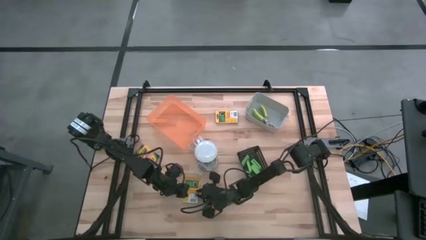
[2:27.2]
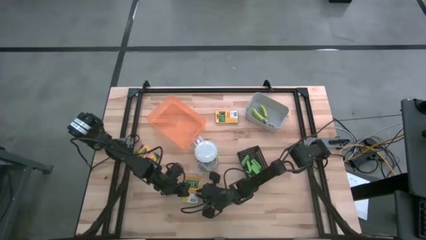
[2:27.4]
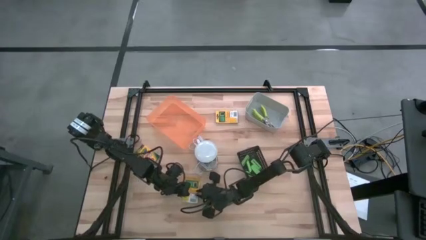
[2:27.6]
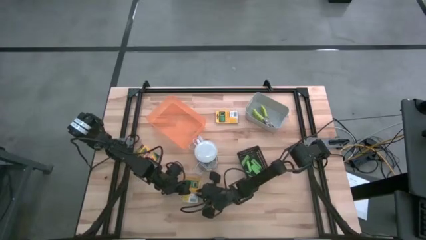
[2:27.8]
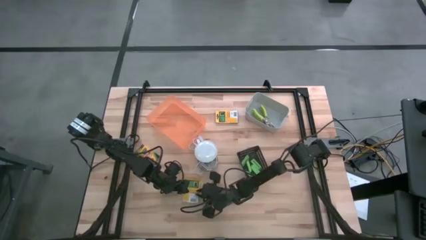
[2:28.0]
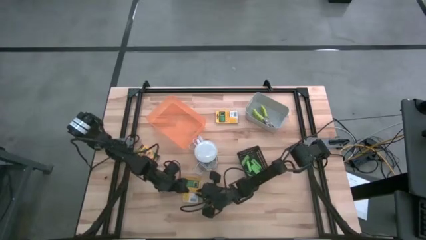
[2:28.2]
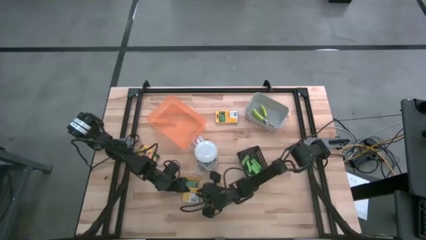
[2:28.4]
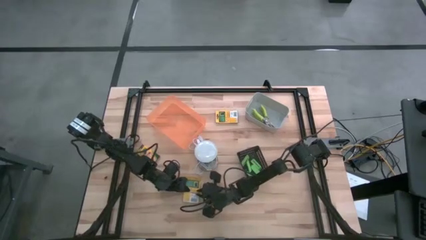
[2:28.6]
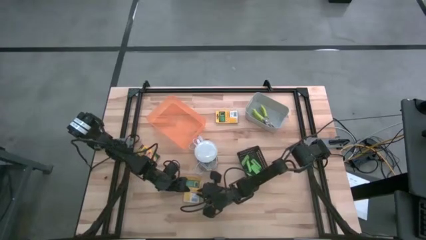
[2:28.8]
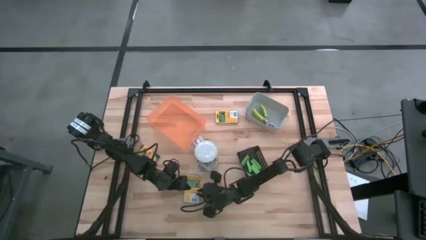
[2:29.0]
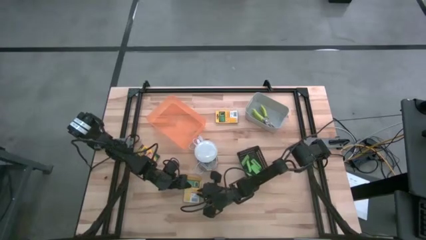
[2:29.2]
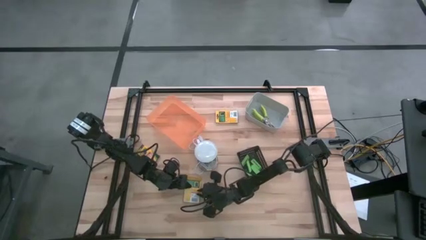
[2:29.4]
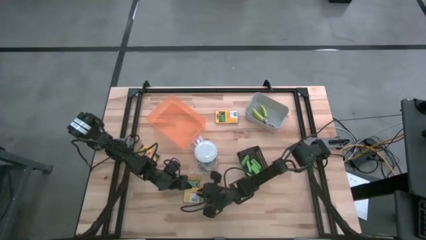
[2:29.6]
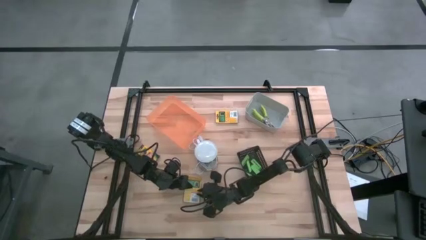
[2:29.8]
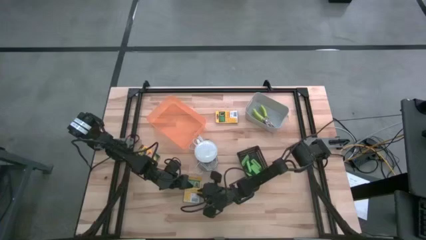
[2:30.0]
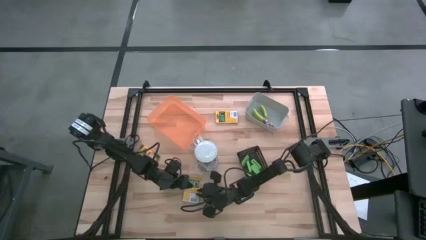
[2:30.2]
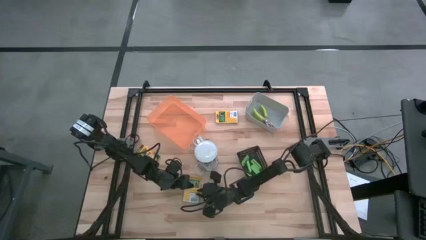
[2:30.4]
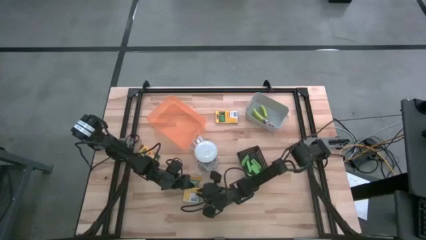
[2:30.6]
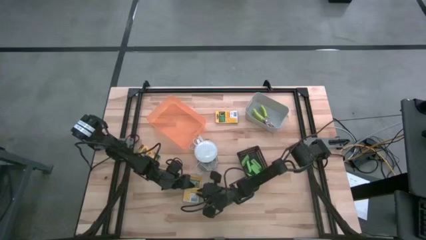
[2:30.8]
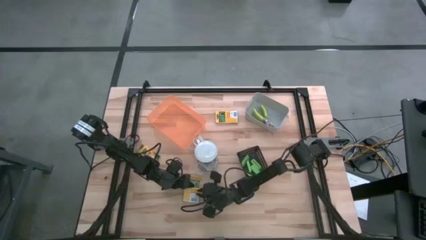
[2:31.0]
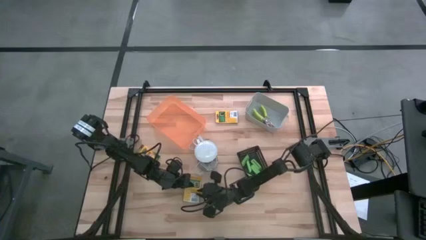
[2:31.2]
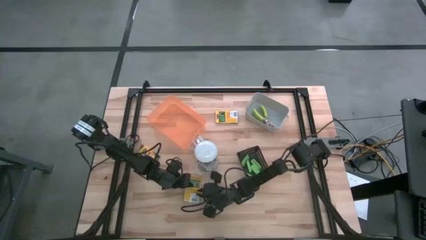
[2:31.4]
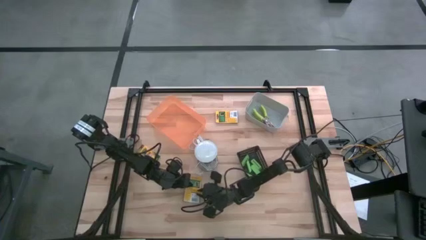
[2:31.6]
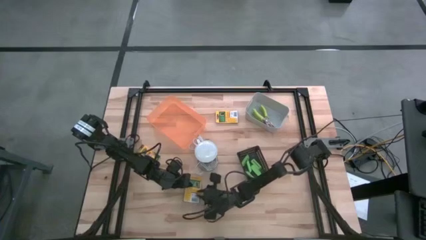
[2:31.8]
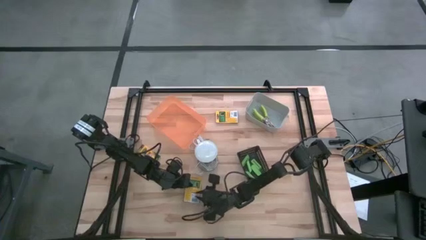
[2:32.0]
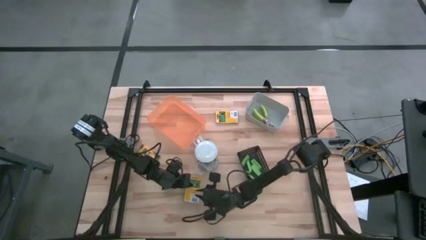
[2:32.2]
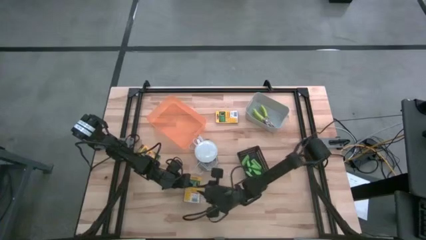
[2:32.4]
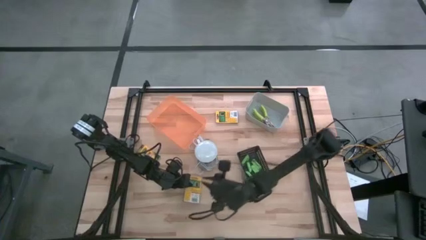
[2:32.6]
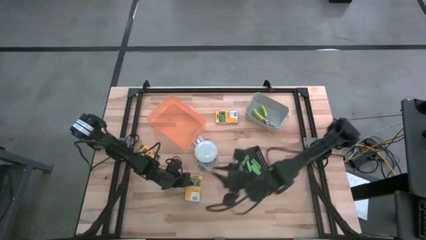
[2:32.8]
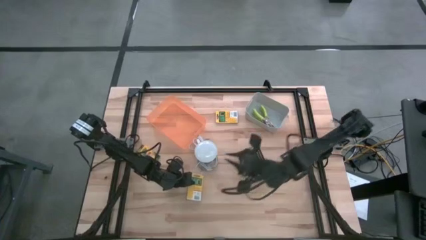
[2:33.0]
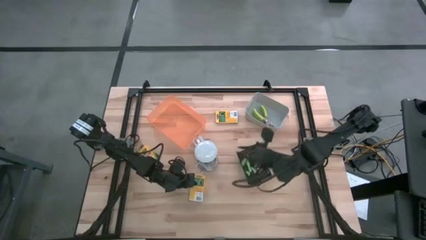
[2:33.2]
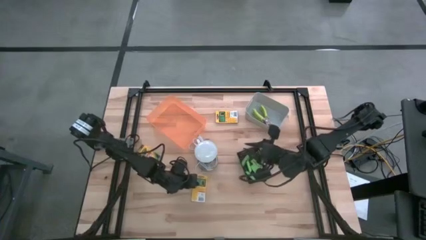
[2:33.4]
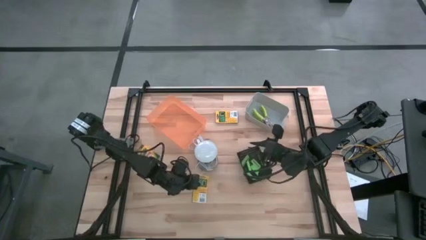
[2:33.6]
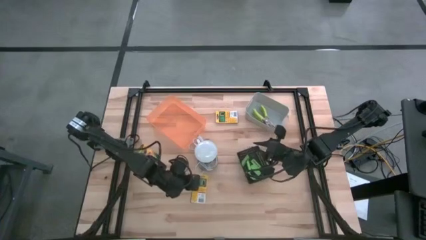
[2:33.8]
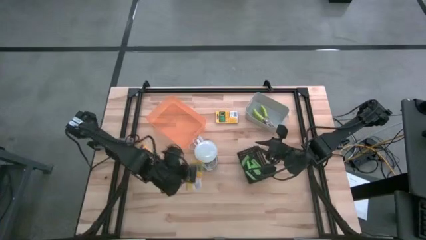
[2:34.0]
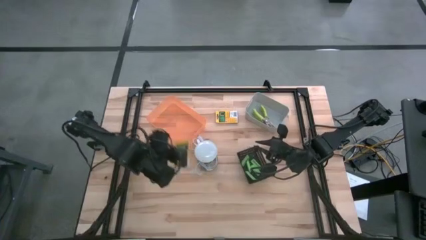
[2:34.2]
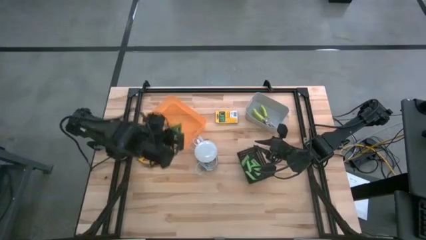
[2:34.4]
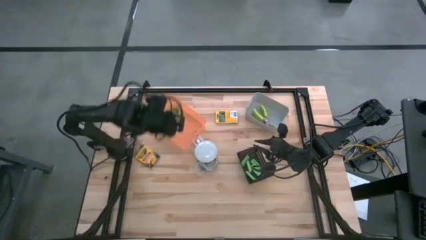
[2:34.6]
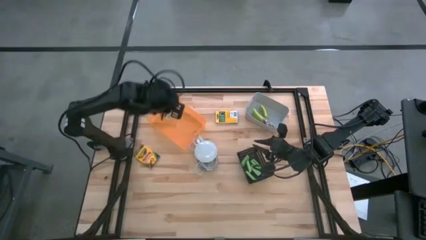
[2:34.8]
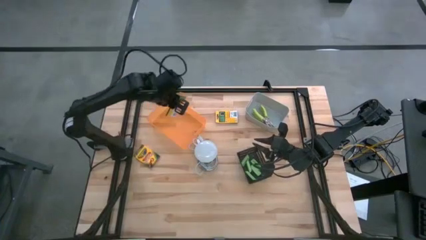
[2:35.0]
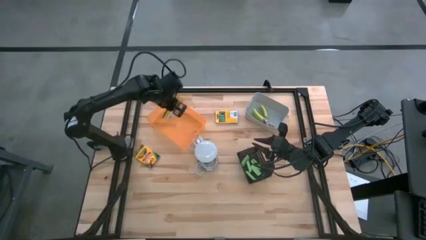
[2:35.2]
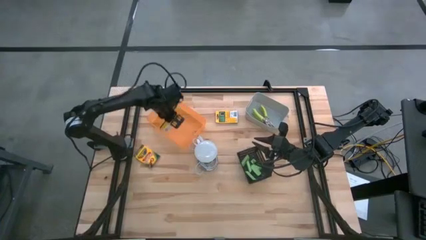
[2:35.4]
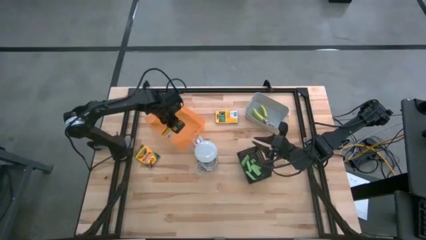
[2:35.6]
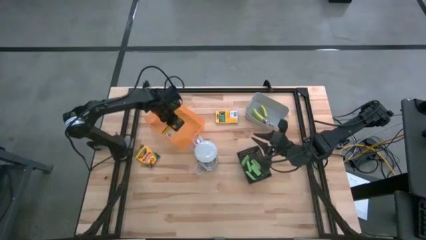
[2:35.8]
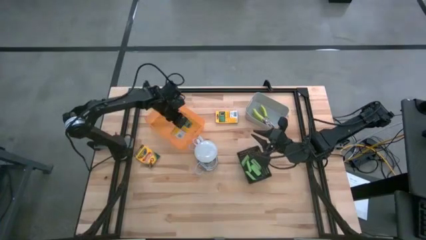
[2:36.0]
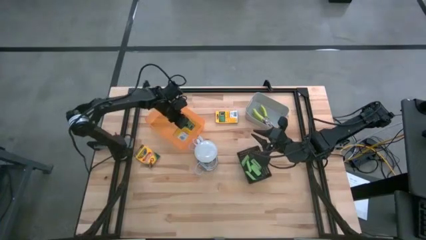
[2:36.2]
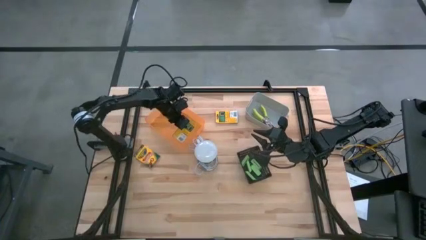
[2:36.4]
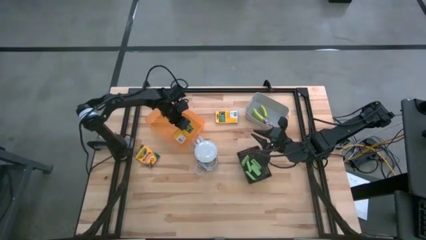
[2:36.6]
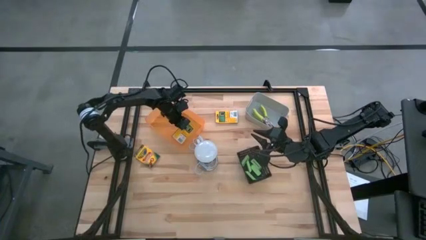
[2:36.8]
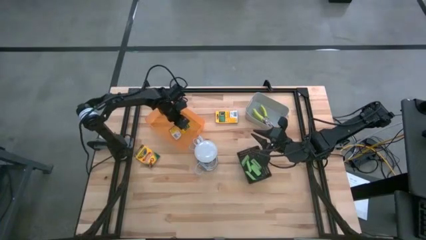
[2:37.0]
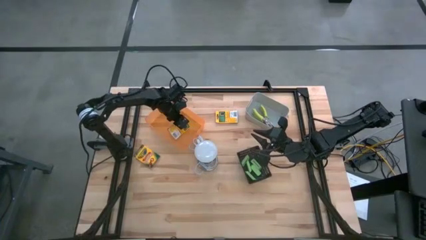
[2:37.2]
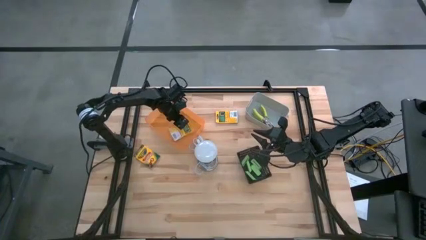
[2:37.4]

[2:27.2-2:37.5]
Task: Pick & Place School Supplies
Put the box of crayon into the orange bin

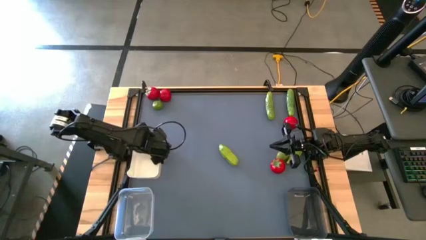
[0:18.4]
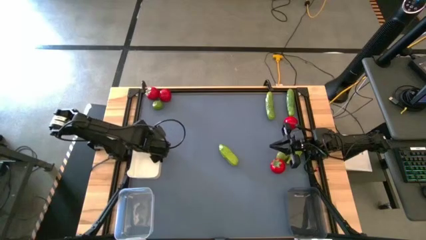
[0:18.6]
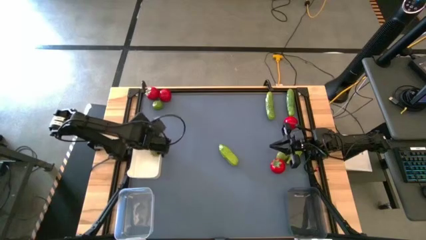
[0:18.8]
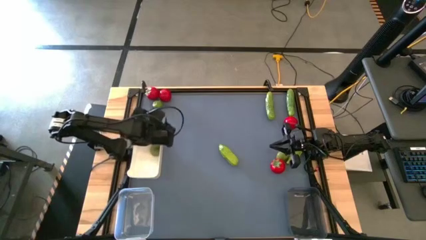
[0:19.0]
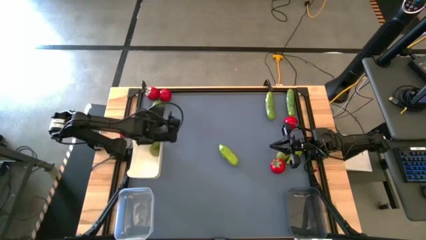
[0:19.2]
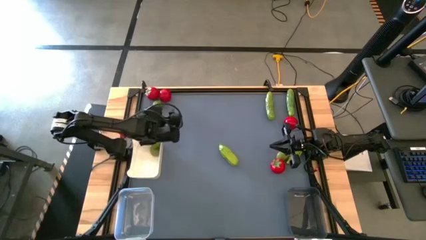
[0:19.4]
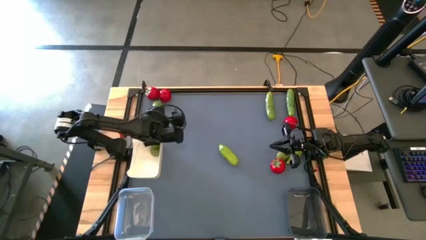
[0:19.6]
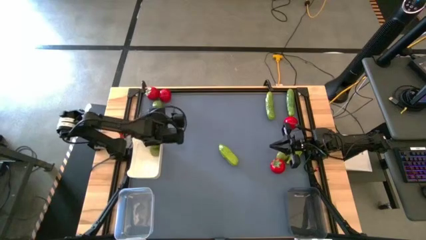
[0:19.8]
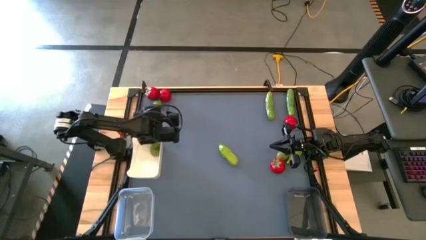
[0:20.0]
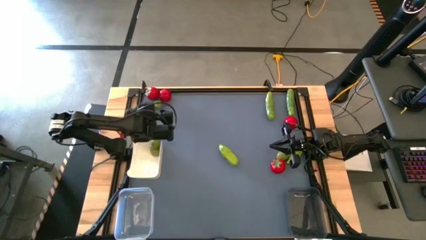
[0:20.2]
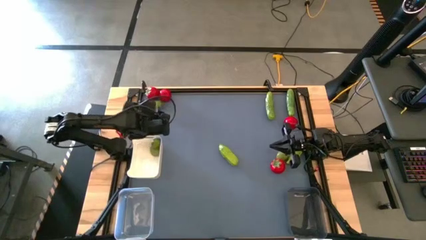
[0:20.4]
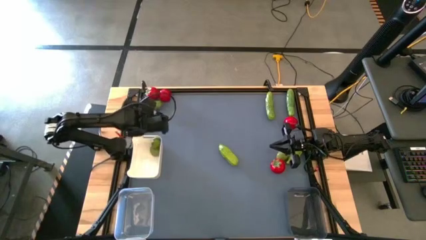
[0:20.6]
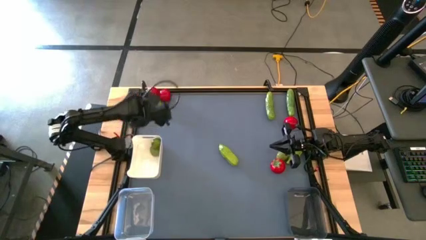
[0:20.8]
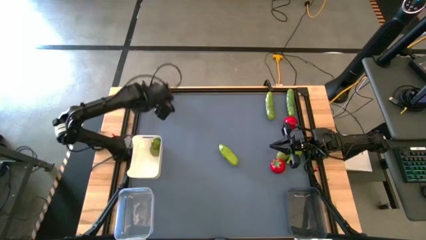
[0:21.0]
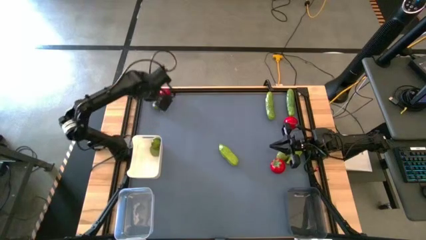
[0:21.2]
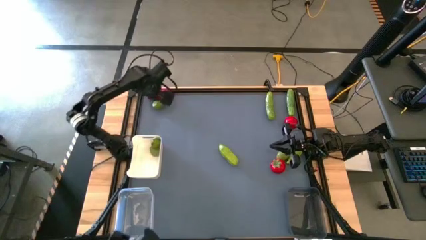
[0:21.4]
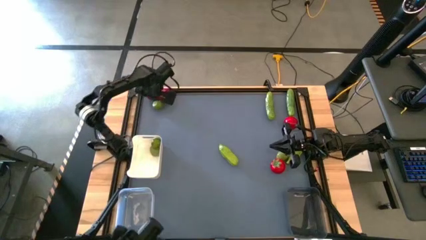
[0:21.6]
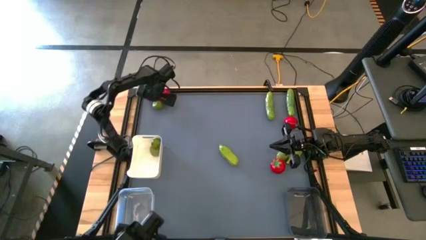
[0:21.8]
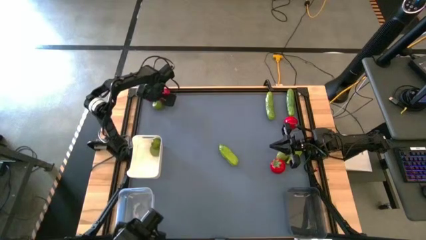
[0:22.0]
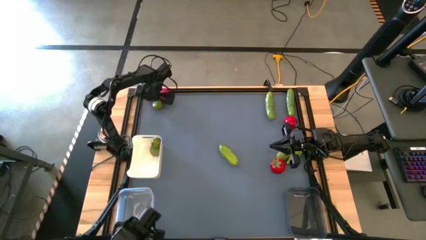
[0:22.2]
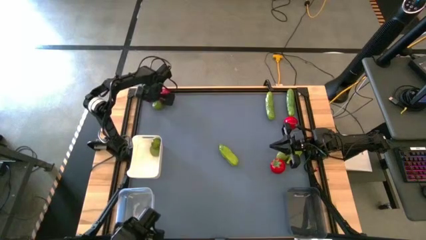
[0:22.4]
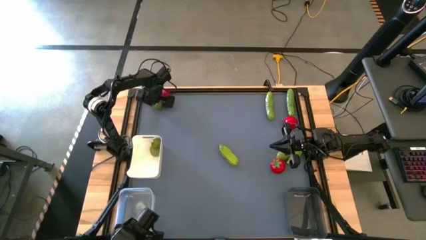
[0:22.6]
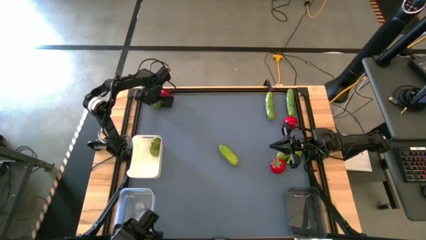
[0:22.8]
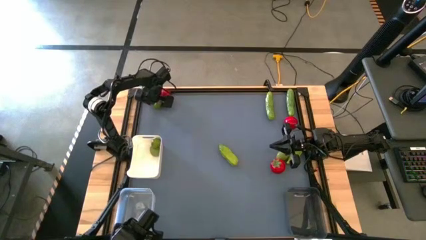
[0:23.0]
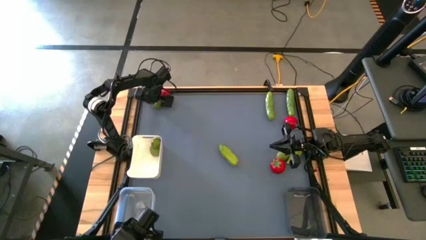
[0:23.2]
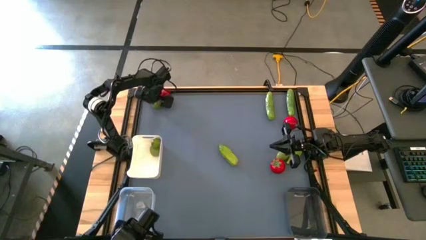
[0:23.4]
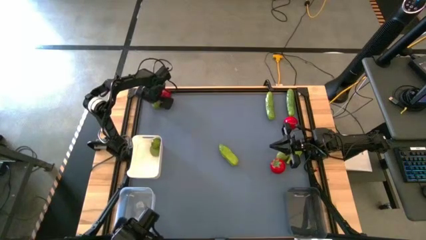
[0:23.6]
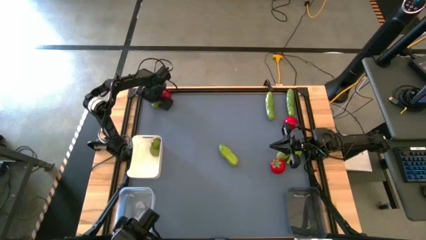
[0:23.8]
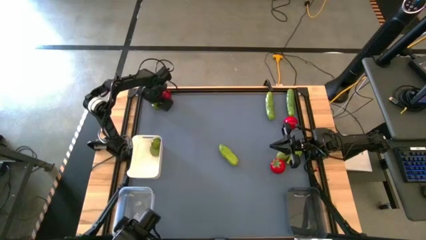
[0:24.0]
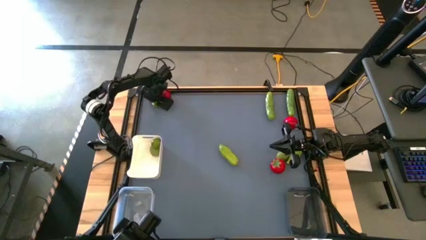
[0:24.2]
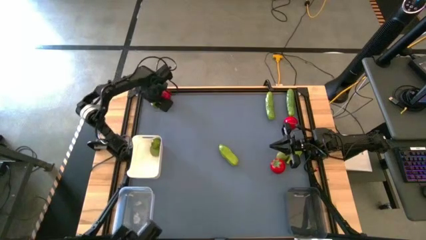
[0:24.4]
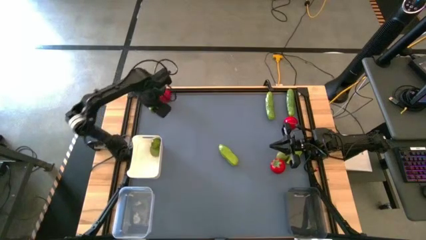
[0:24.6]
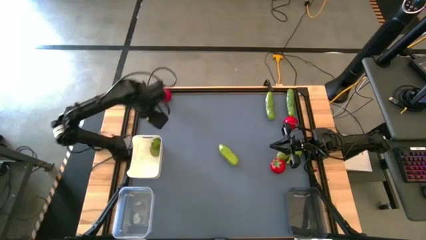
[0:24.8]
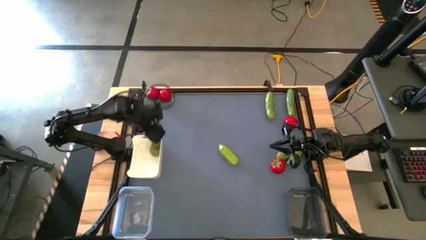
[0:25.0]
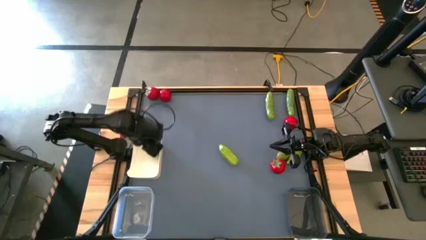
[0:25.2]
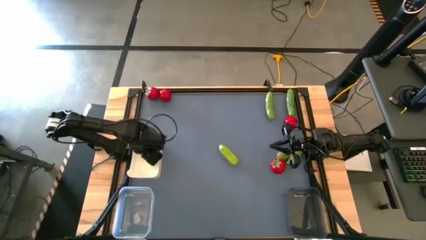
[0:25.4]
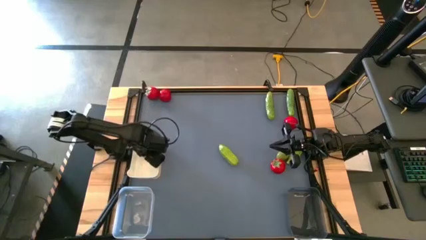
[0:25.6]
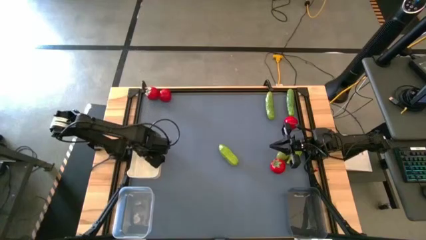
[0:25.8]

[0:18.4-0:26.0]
Task: Sort produce into baskets
Put the green lime into the white bin
